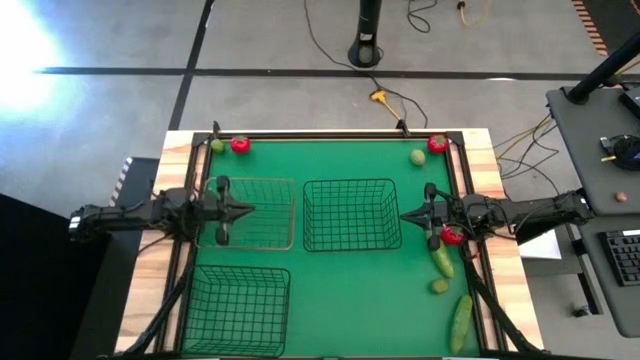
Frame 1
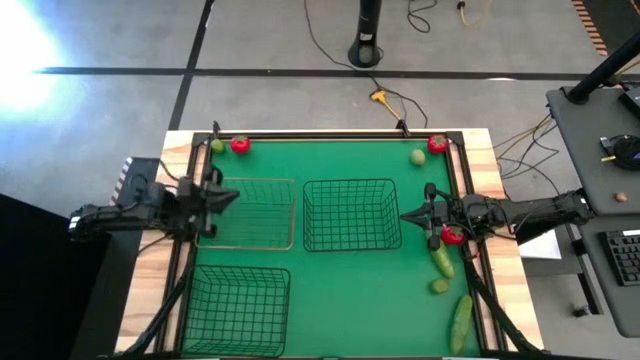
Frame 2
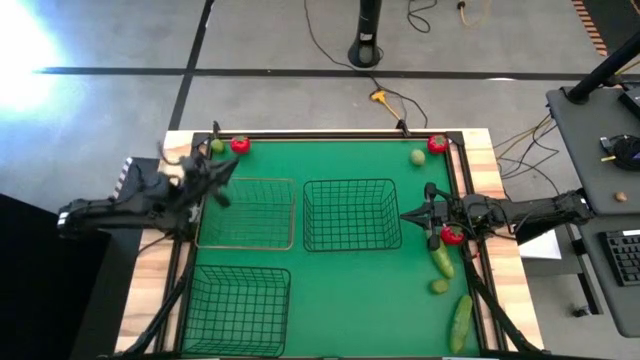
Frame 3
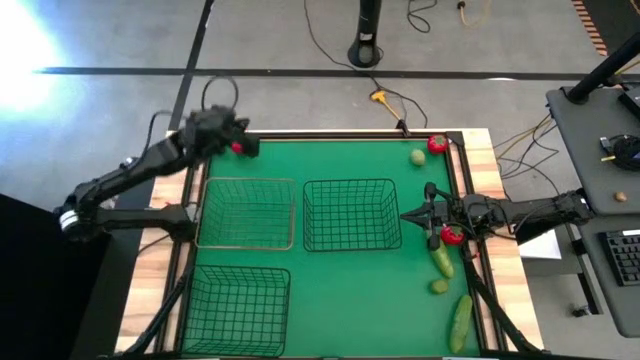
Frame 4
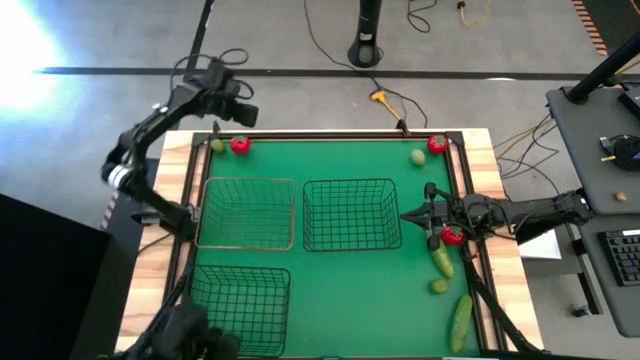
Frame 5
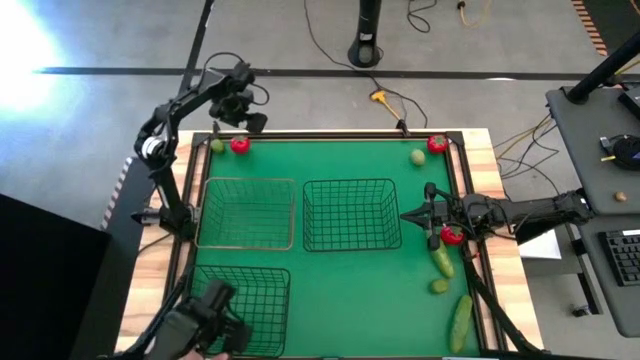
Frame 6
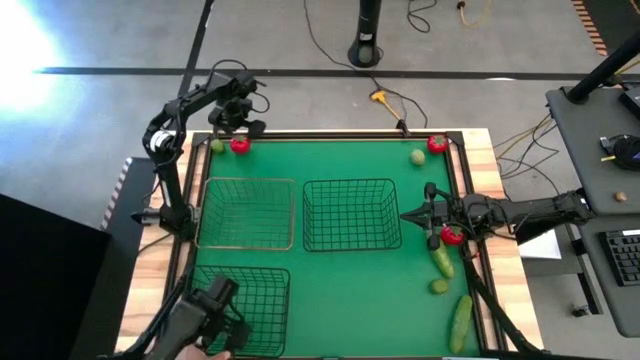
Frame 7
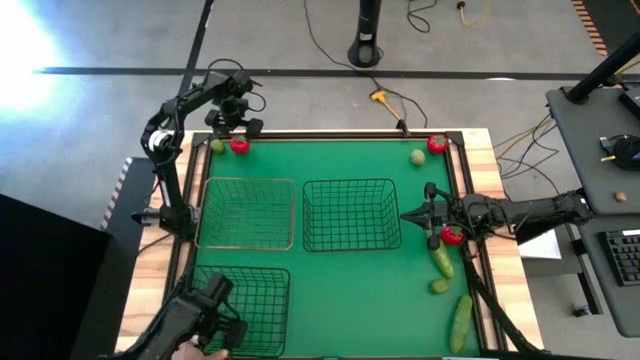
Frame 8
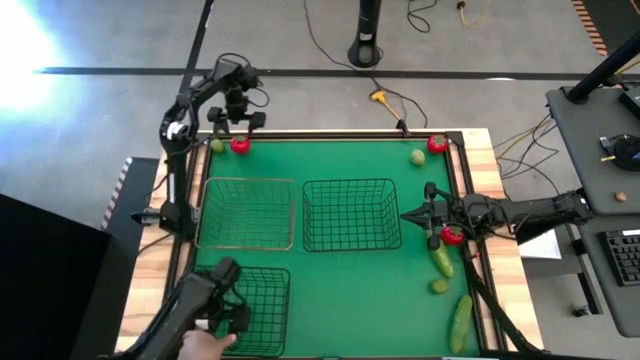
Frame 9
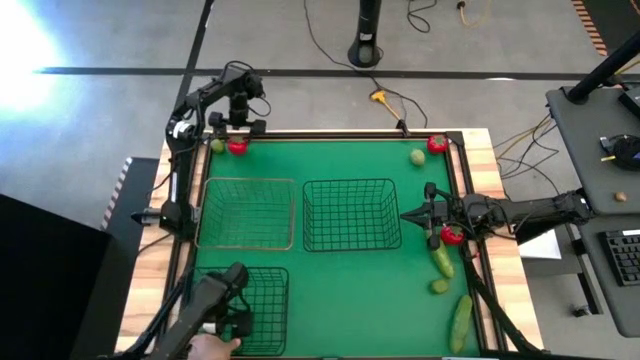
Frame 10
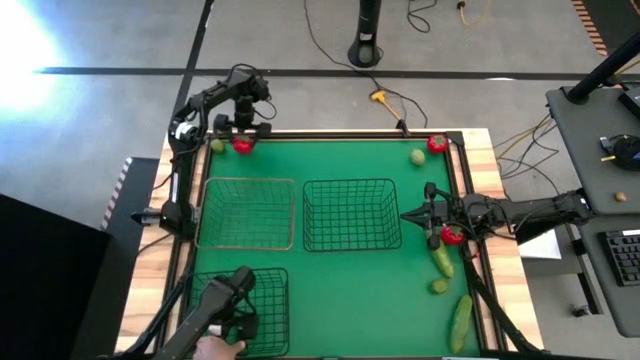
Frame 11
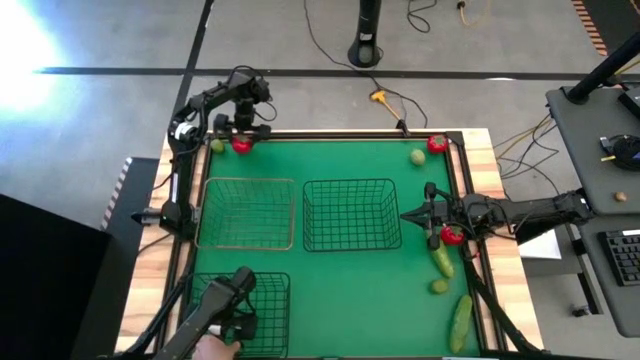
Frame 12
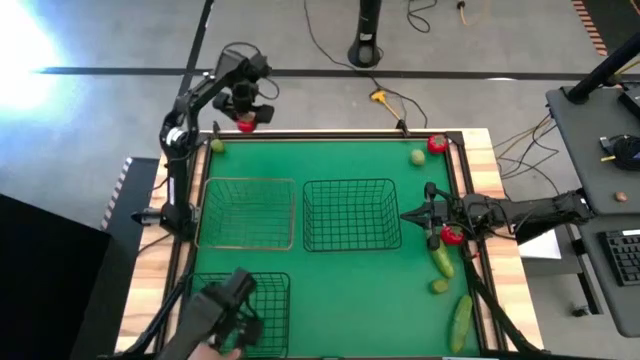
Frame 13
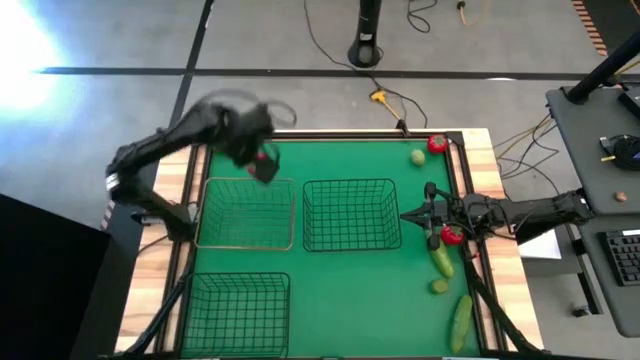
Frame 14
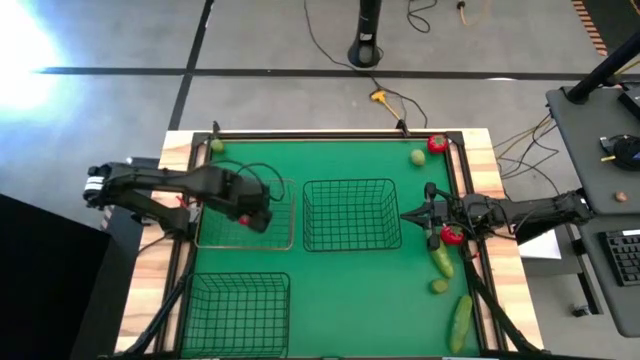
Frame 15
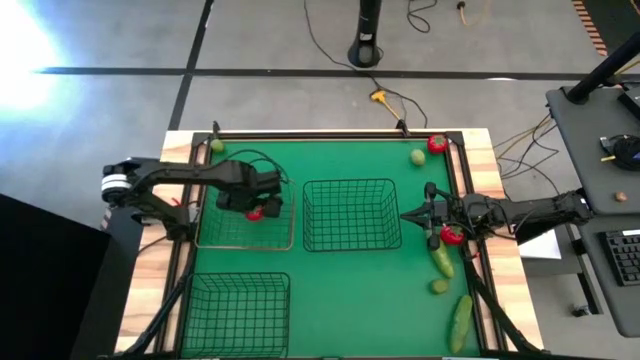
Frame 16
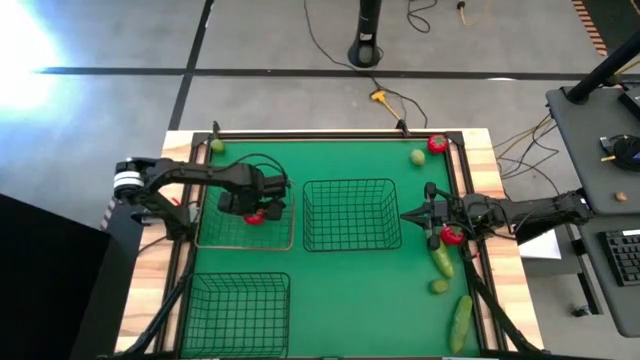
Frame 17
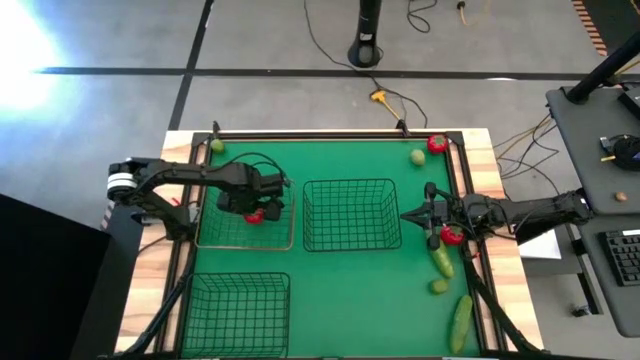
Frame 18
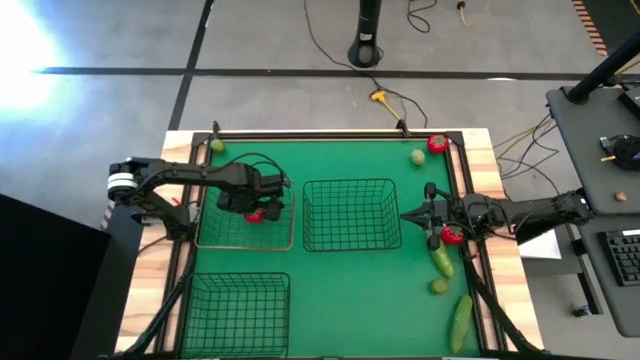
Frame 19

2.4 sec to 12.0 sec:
Task: Sort produce into baskets
Put the top left tomato into the gold wire basket

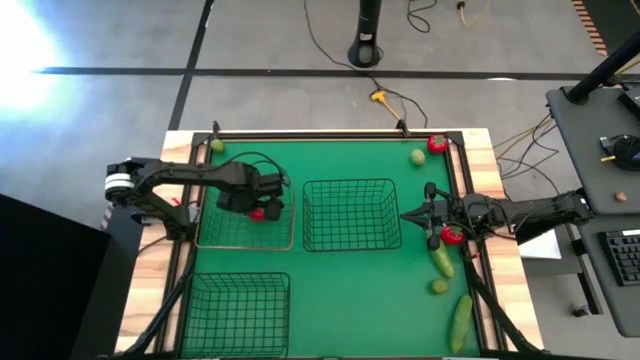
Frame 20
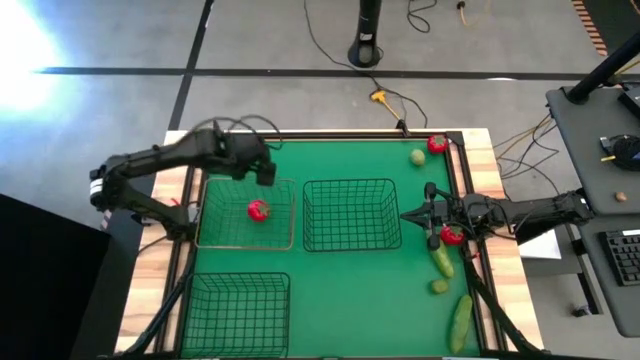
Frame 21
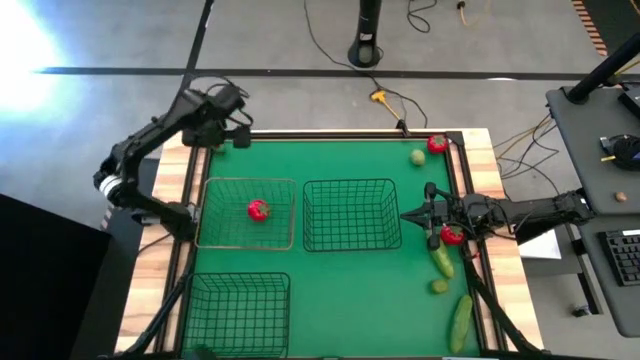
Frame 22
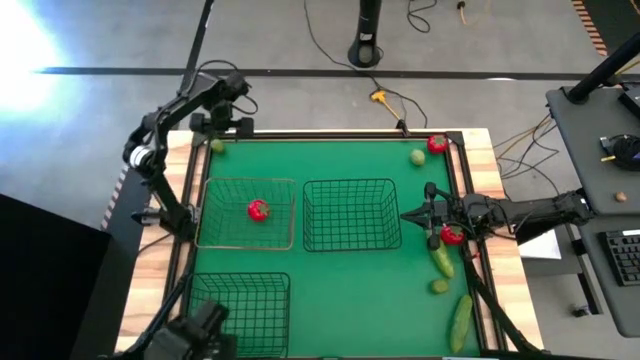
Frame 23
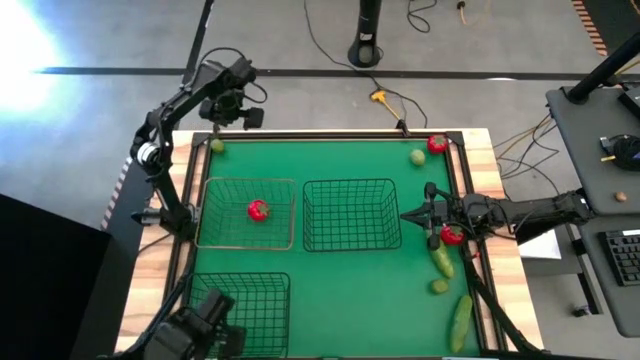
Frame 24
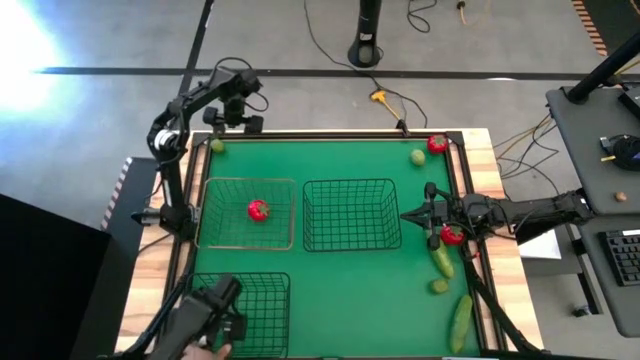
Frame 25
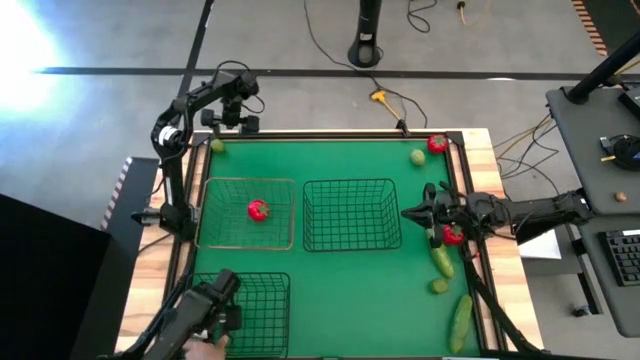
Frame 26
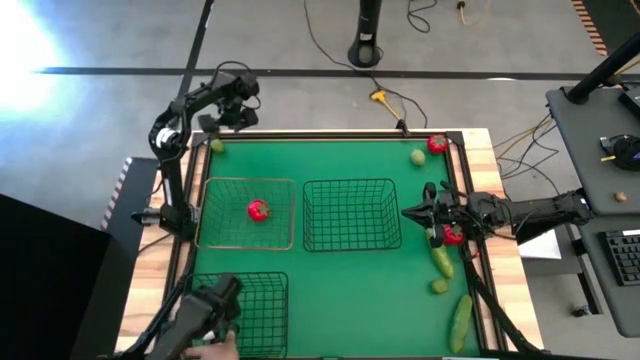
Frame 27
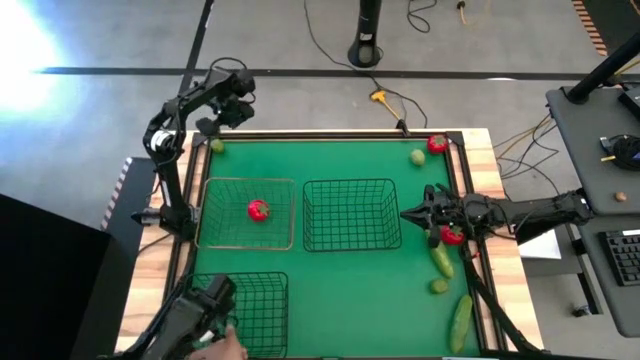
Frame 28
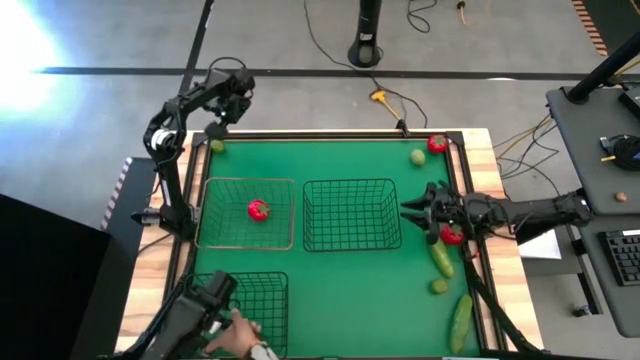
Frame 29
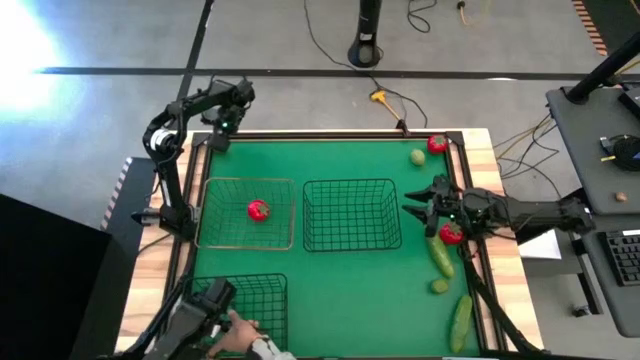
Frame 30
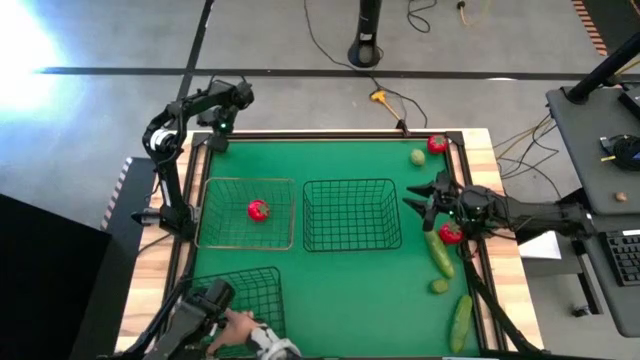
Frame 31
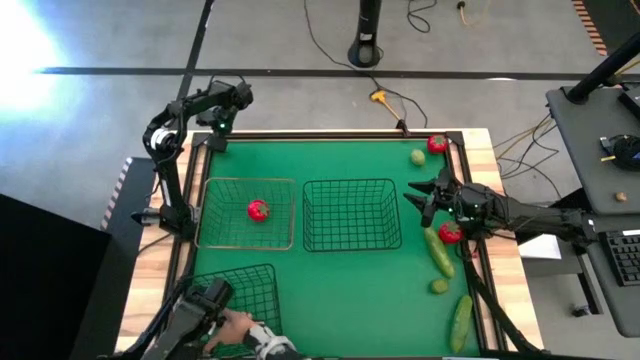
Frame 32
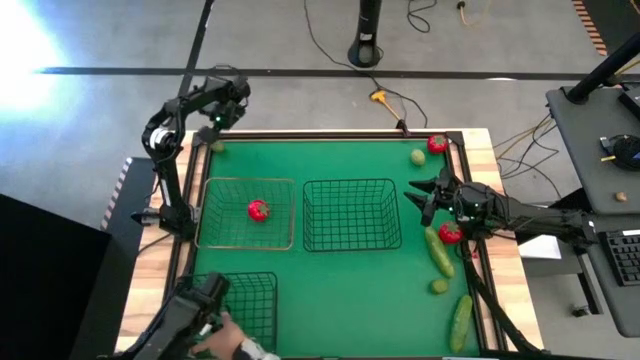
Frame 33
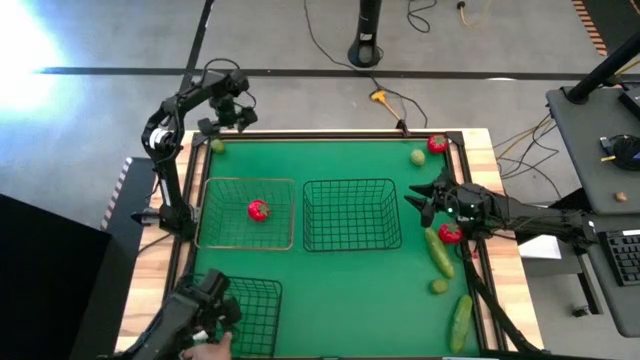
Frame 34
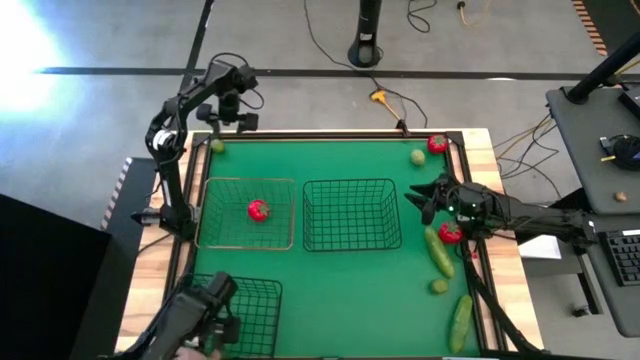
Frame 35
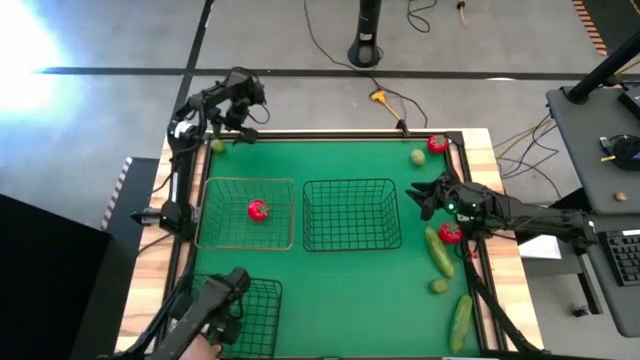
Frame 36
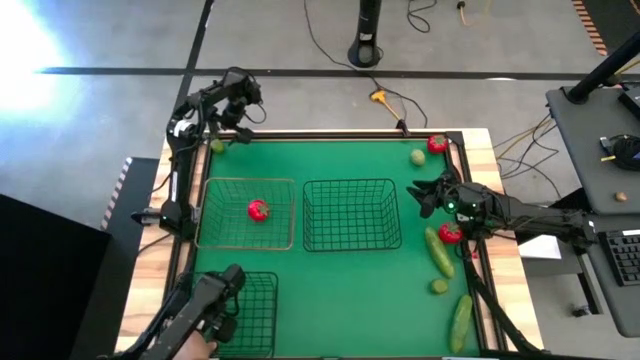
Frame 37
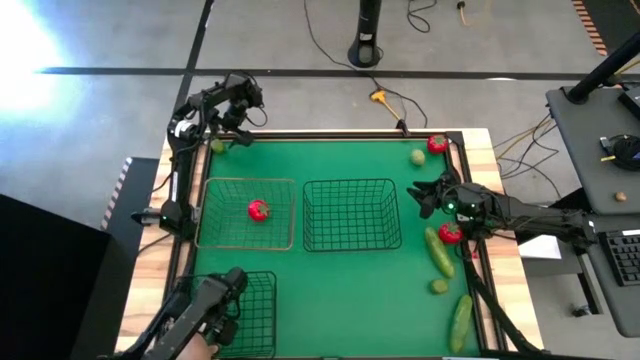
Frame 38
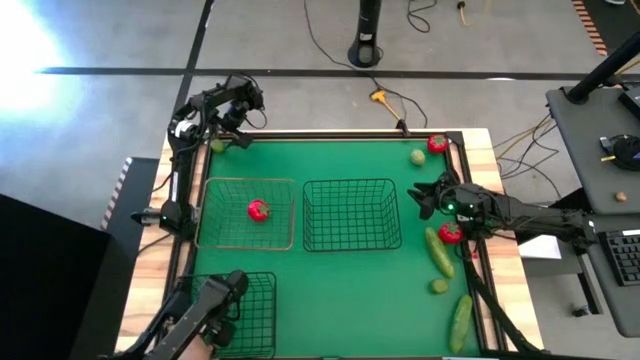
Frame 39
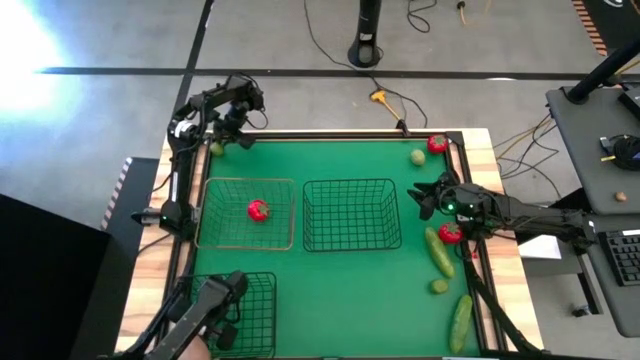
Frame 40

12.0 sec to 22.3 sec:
Put the top left lime into the bottom black wire basket

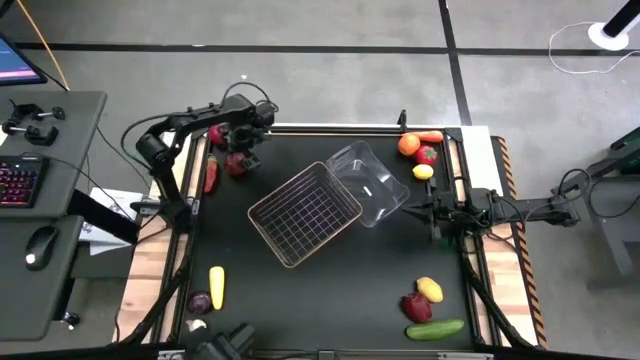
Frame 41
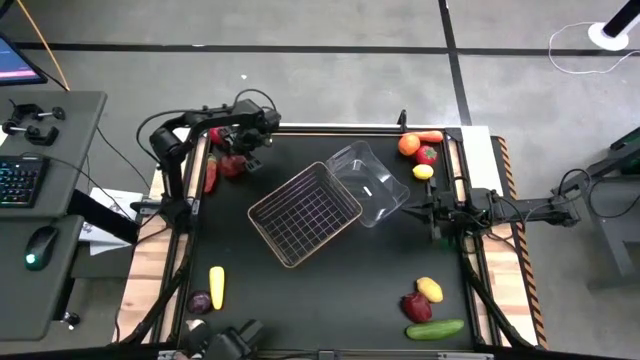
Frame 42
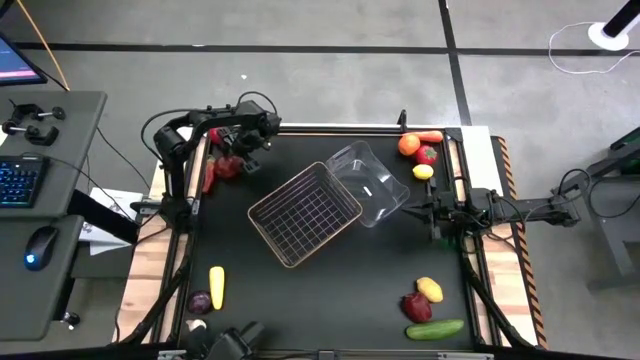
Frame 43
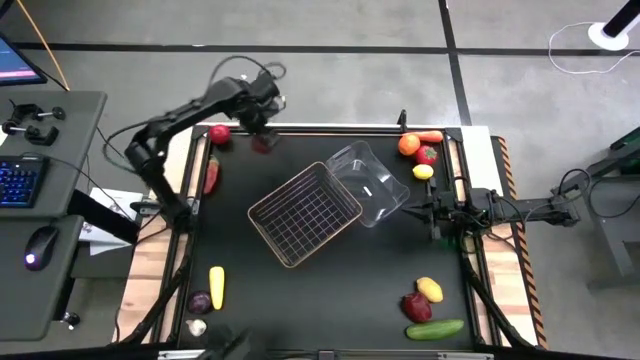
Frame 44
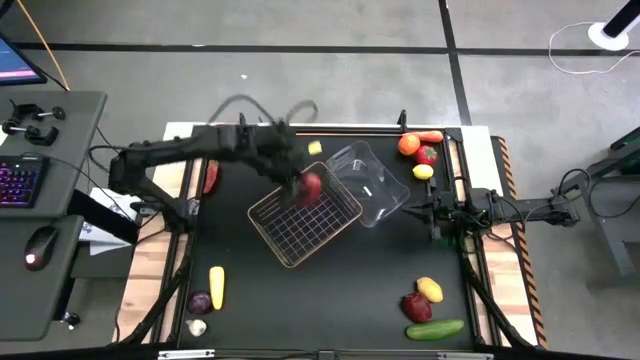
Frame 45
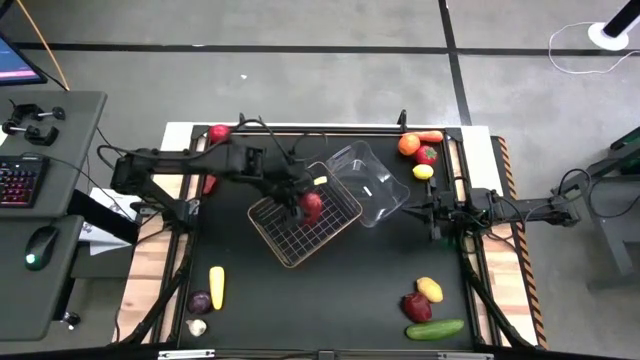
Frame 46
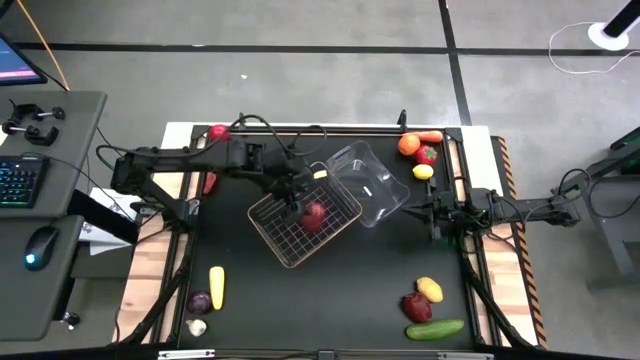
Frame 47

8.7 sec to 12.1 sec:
Task: Sort produce into baskets
Put the top apple into the gold wire basket
